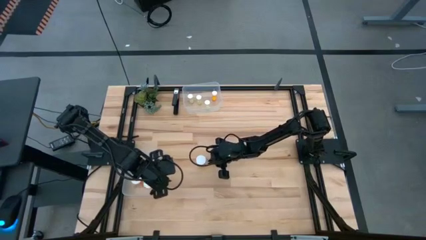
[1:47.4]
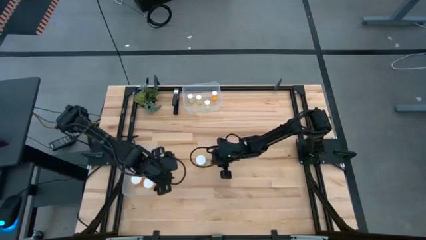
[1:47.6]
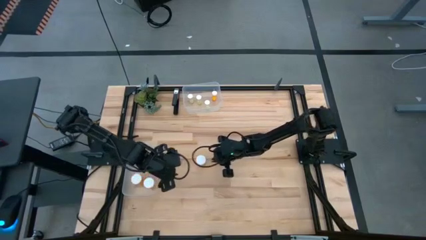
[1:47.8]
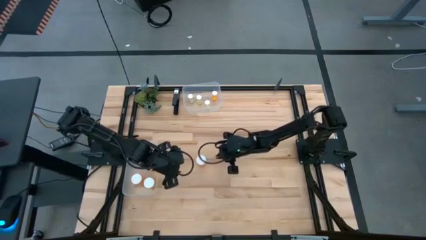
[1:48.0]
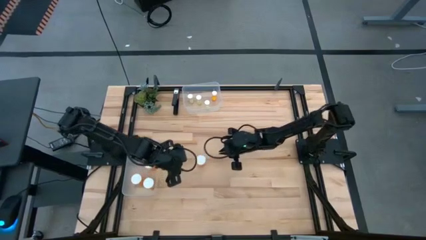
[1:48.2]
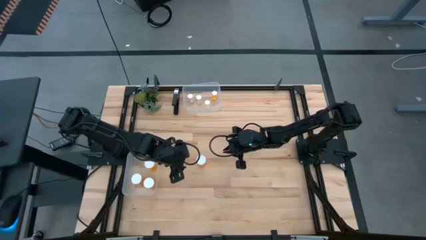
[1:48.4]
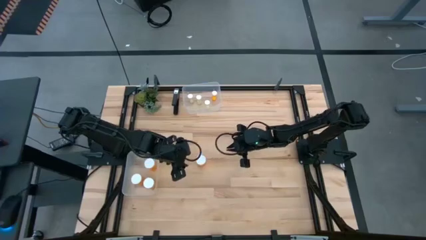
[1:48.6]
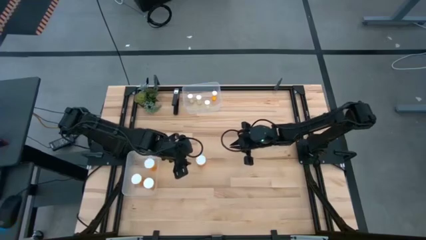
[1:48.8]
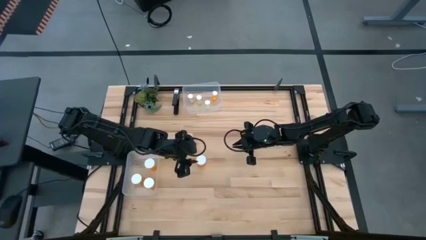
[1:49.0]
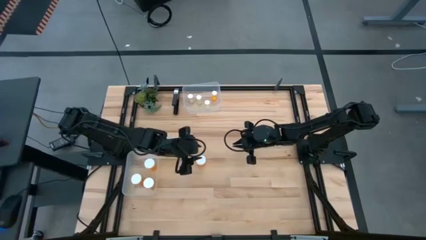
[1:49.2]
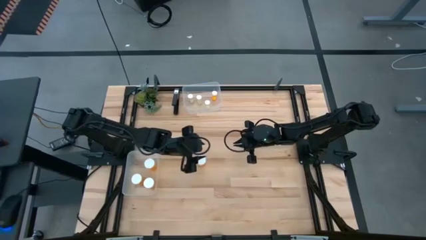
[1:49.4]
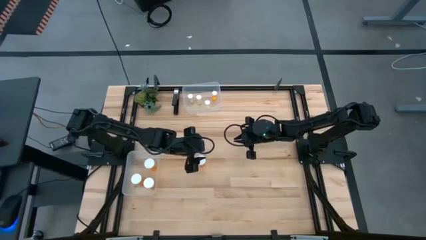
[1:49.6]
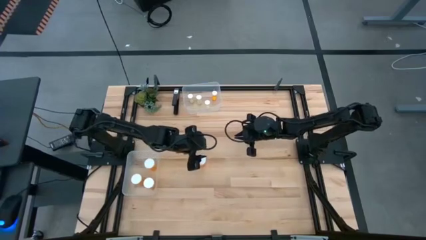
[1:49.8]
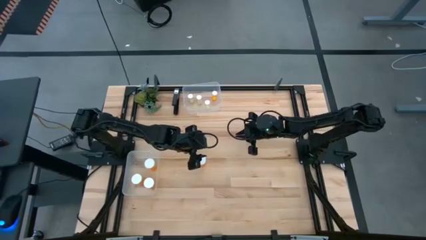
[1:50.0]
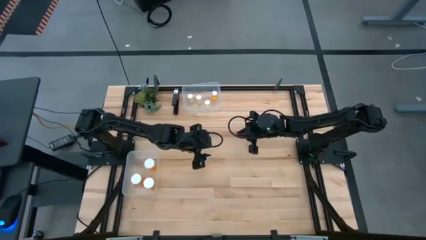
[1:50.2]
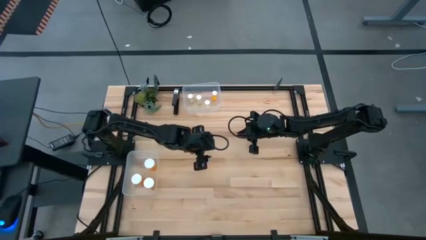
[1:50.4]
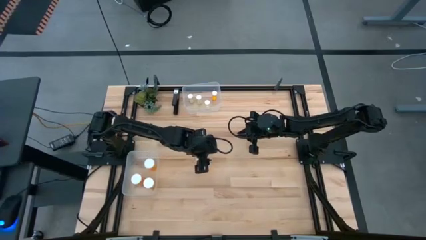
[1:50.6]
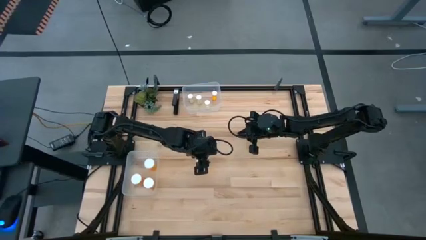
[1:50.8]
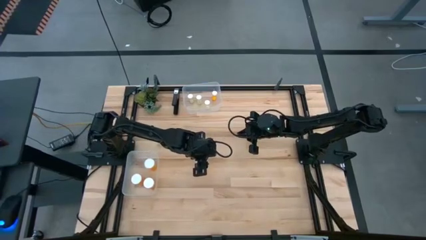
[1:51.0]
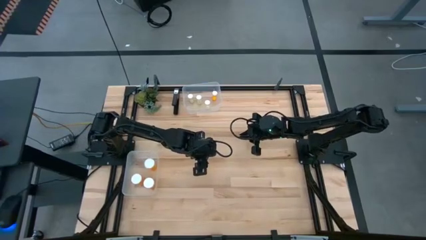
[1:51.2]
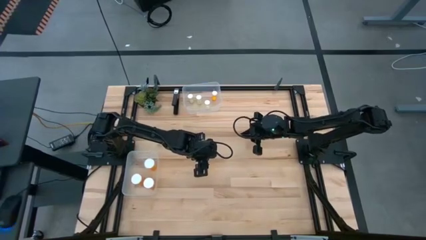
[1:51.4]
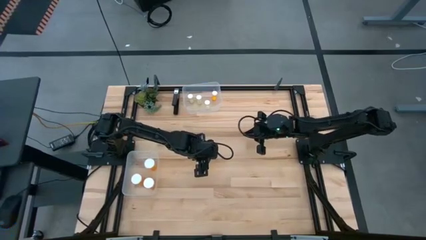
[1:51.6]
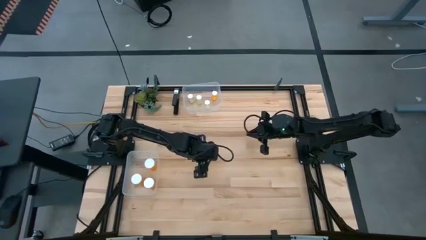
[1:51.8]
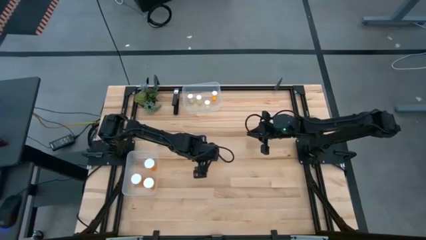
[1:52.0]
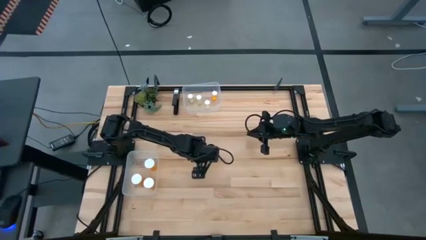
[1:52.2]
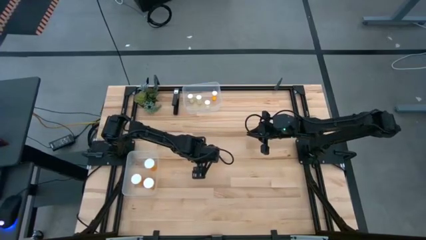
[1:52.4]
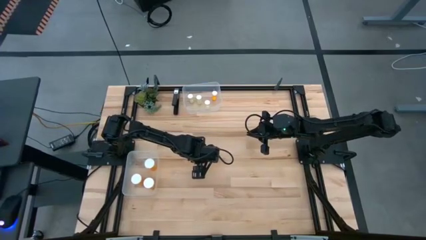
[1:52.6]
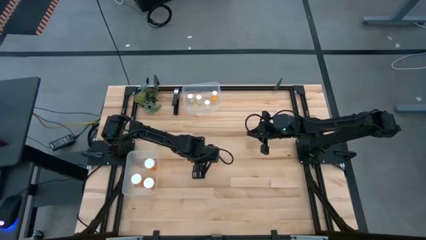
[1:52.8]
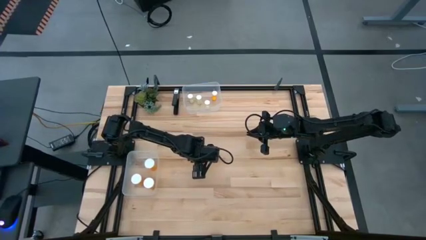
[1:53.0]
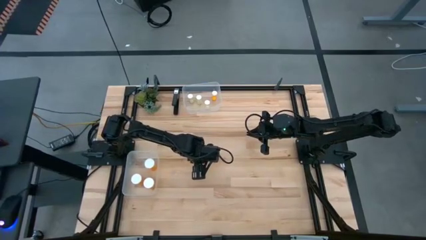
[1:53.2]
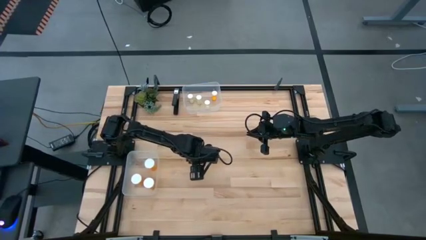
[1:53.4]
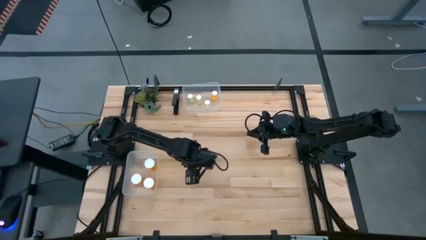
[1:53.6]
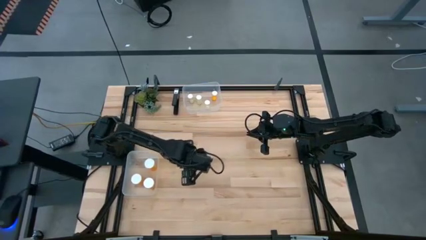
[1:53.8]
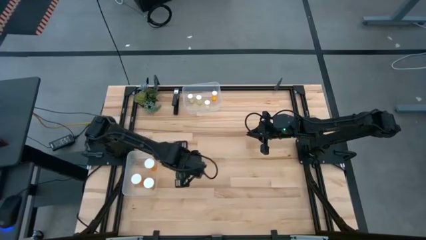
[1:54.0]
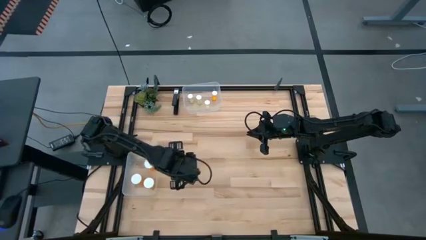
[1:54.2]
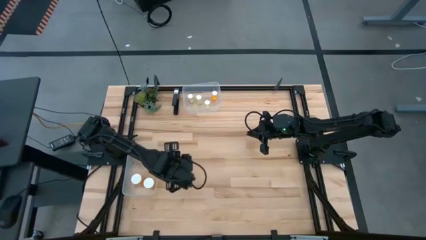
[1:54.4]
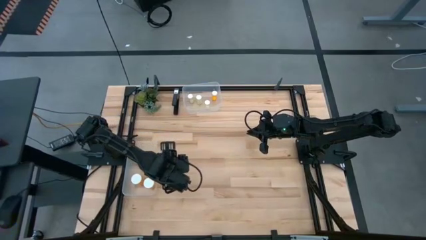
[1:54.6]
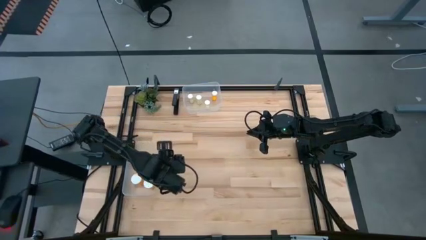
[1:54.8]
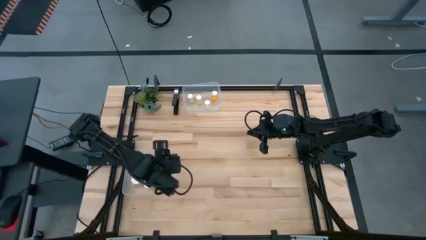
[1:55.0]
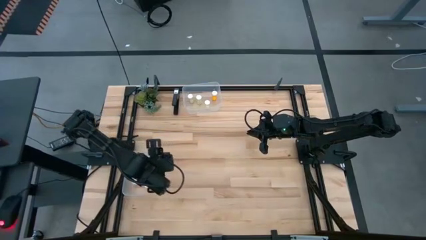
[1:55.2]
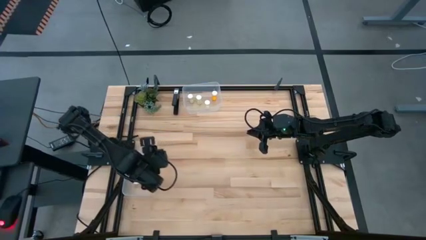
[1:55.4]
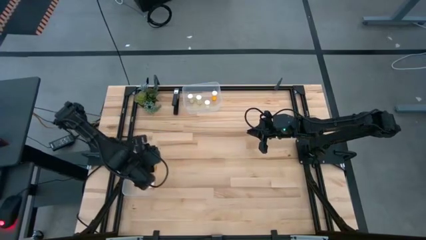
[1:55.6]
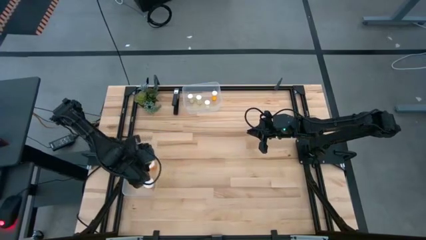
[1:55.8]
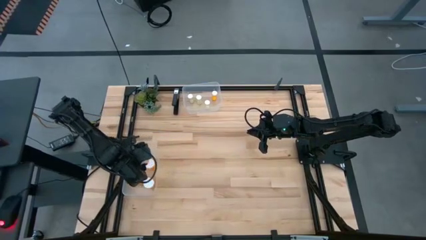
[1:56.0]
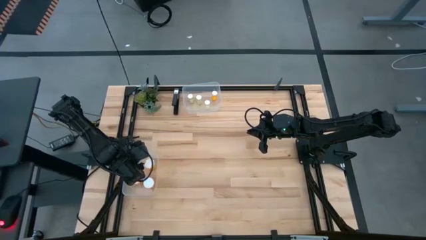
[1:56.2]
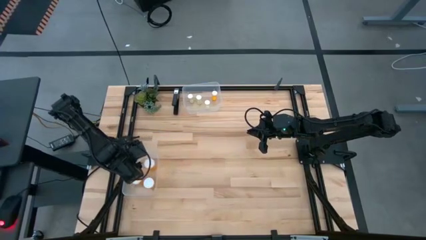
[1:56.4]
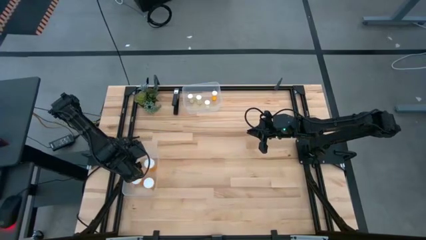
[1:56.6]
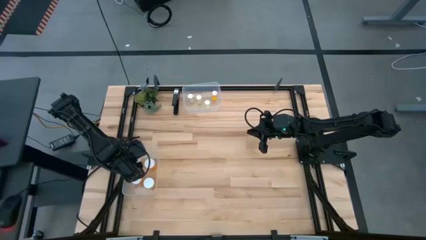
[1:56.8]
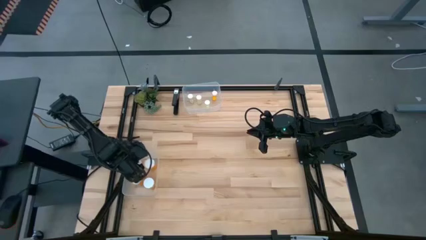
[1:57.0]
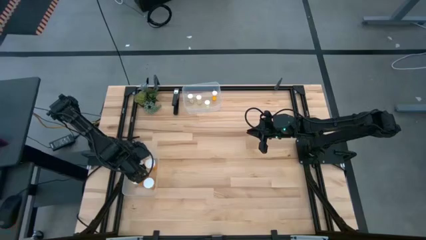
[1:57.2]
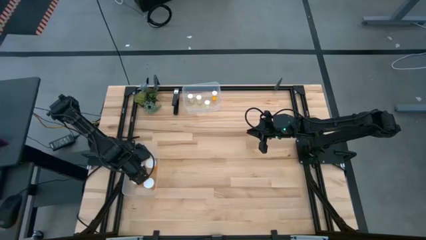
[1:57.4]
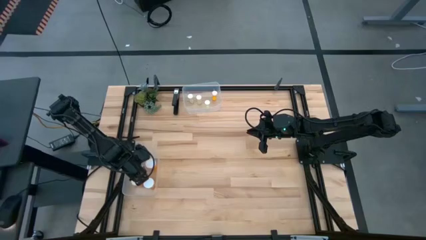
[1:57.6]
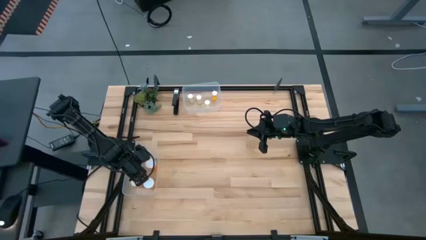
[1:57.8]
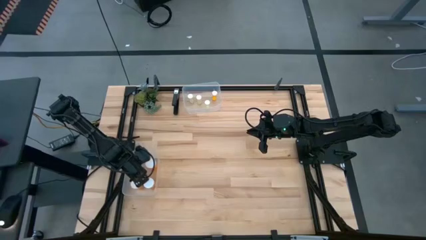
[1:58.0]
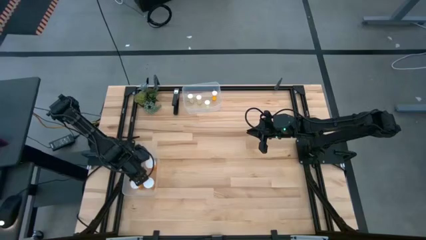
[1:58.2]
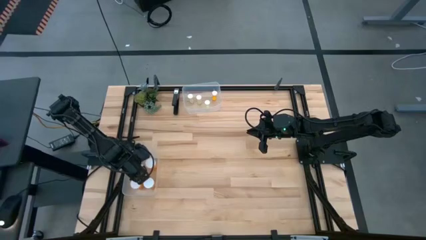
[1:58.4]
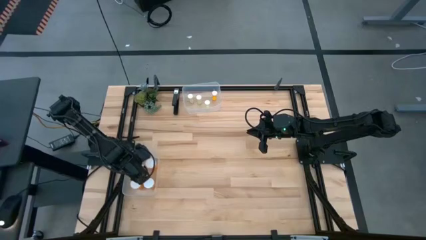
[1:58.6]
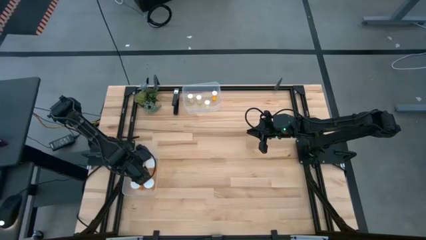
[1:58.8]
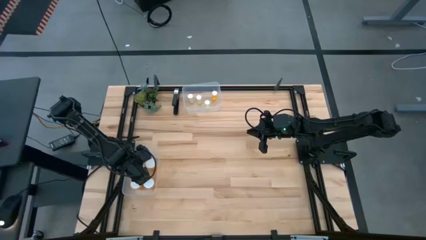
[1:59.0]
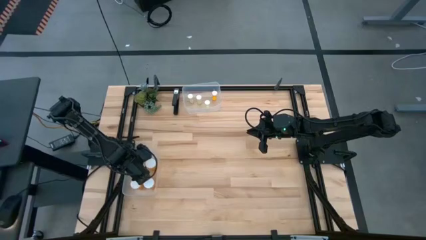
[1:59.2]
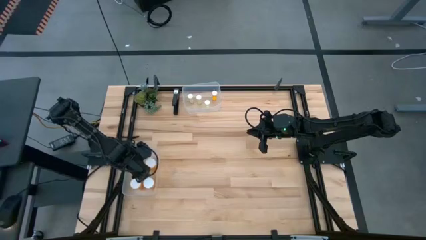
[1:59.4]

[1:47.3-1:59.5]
Task: Pick and place medicine bottles into bin by pill shape (circle, oval)
Put the big orange pill bottle into the bottom transparent bin

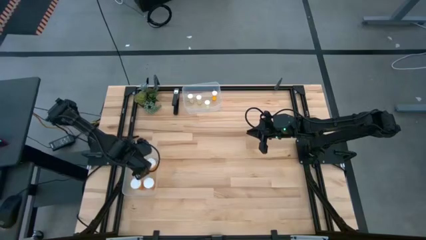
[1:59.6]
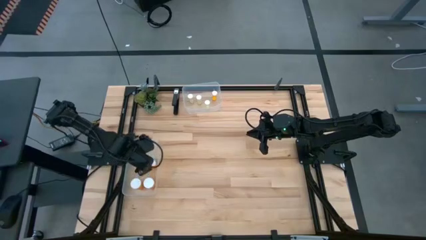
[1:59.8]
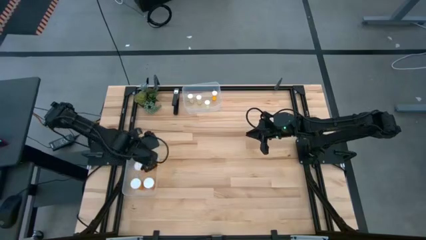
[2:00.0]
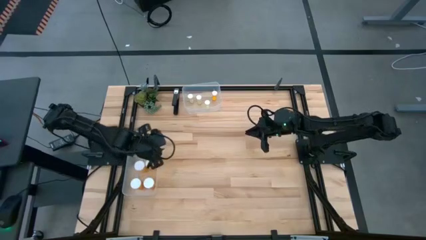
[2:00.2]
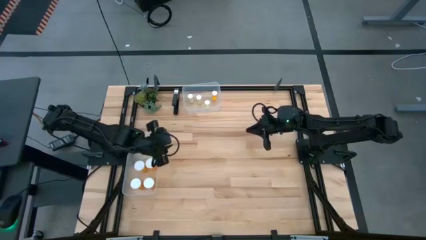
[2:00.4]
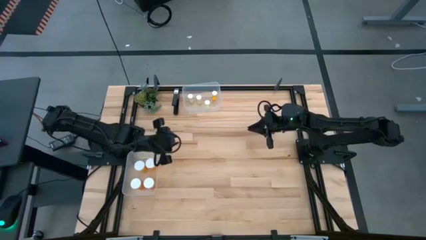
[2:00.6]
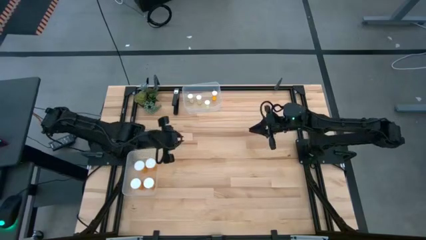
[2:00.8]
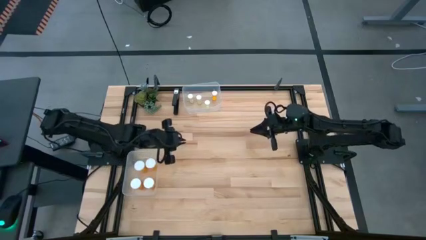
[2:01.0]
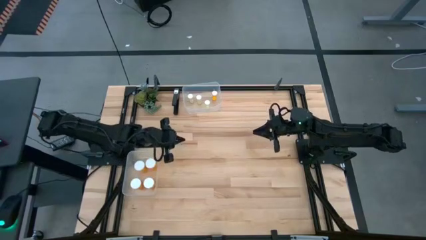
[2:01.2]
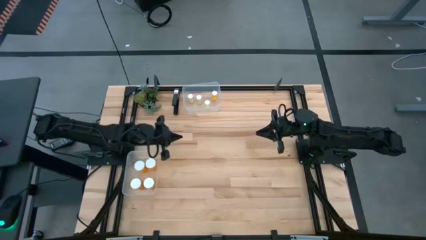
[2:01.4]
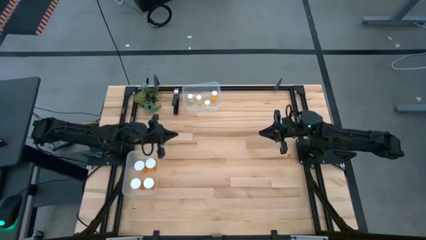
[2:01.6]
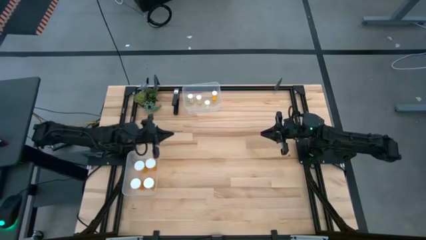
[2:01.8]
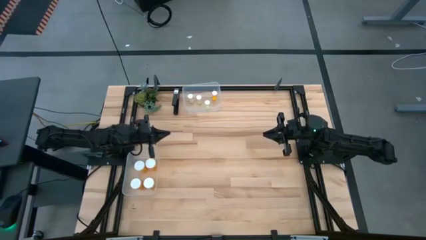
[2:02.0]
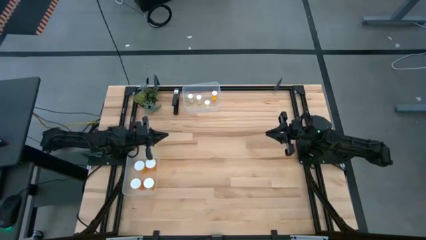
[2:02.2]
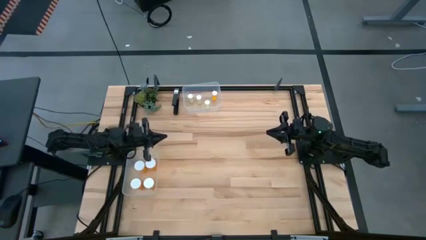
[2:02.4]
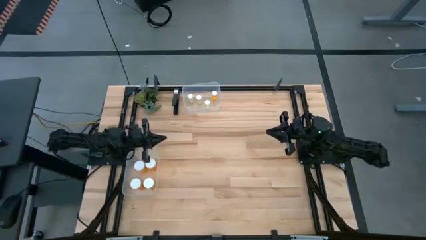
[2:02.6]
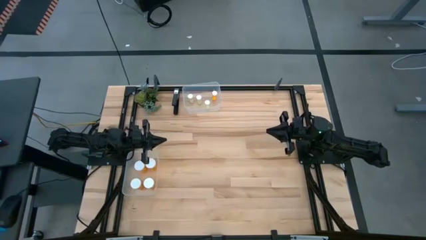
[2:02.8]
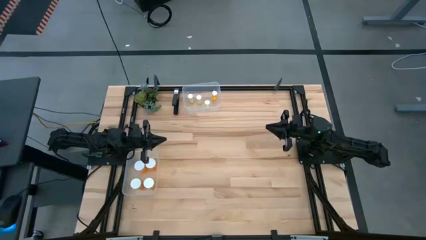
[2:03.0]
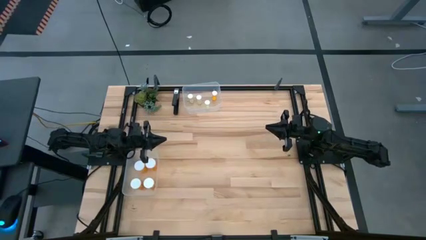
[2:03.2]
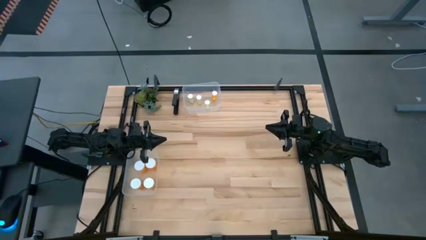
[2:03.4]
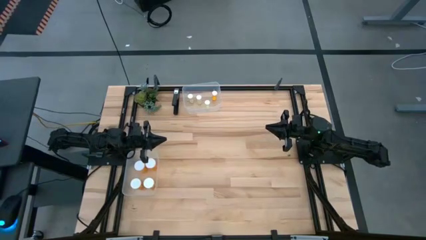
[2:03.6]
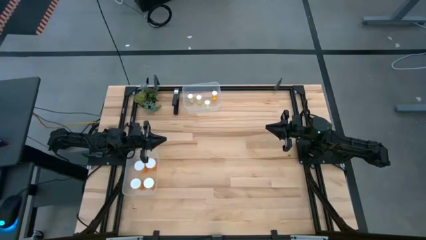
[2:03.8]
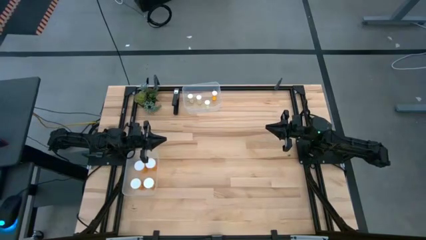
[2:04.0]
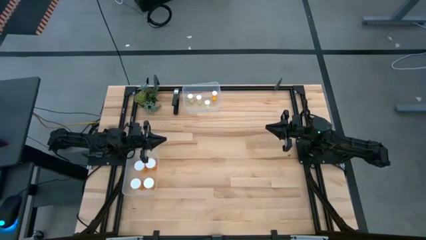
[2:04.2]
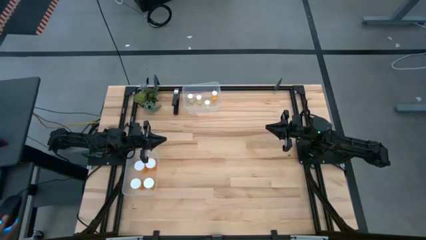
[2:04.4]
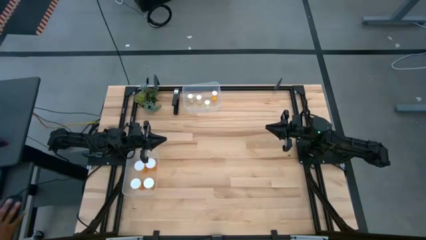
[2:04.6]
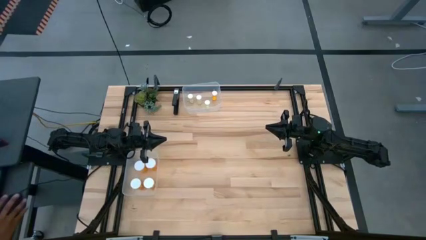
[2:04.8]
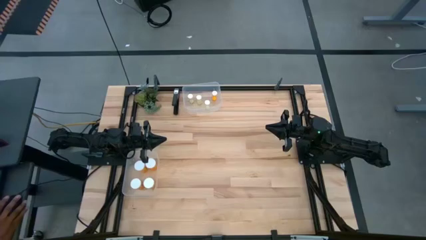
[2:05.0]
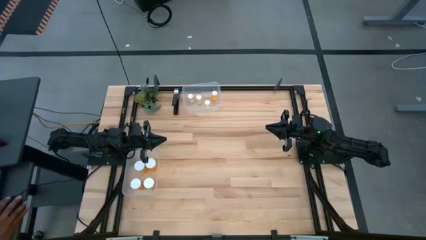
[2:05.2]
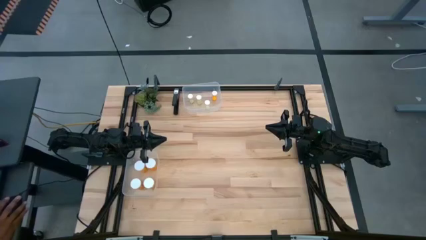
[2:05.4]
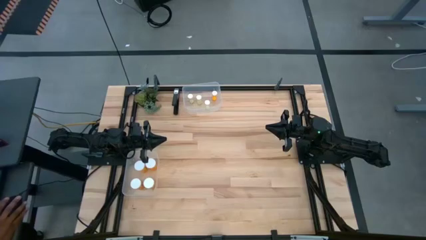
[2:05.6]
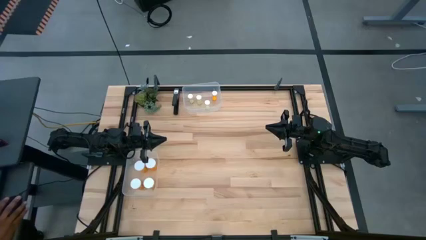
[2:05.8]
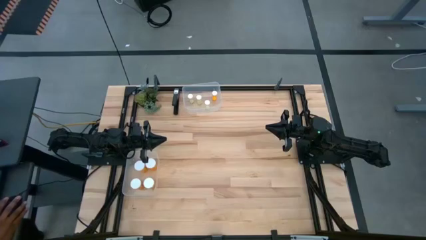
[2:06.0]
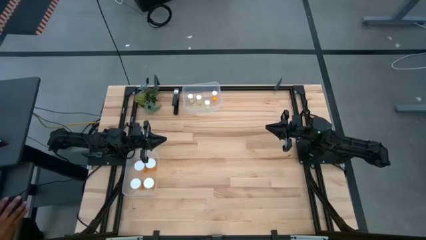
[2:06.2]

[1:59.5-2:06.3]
Return to Home Position
